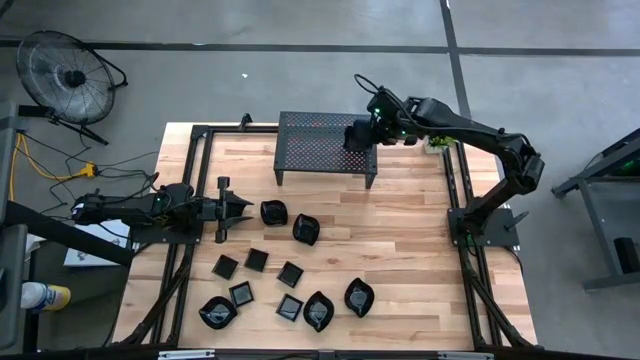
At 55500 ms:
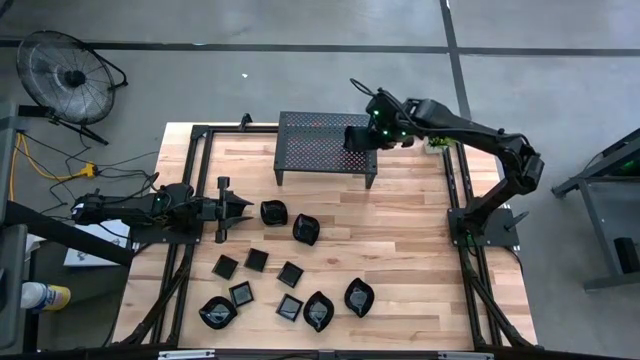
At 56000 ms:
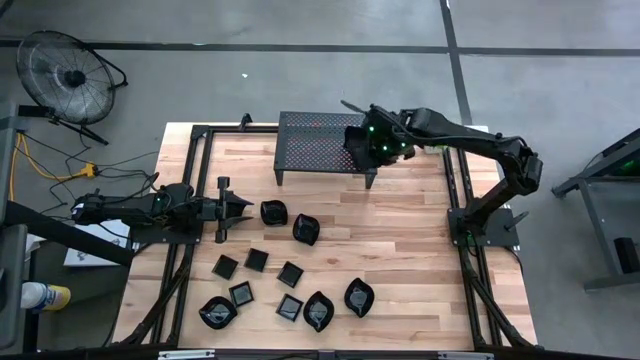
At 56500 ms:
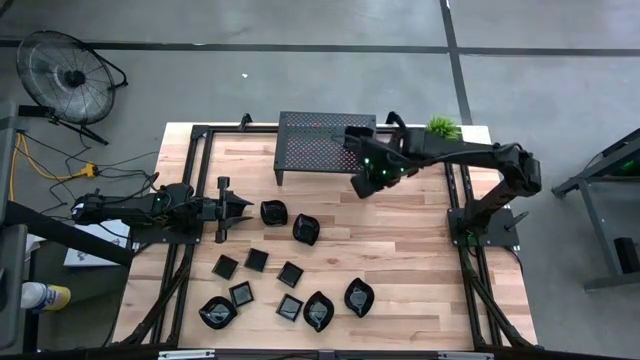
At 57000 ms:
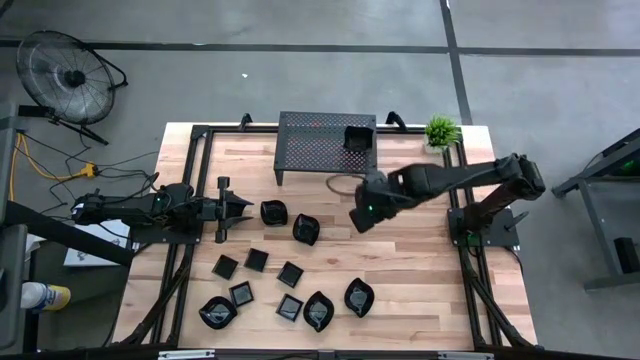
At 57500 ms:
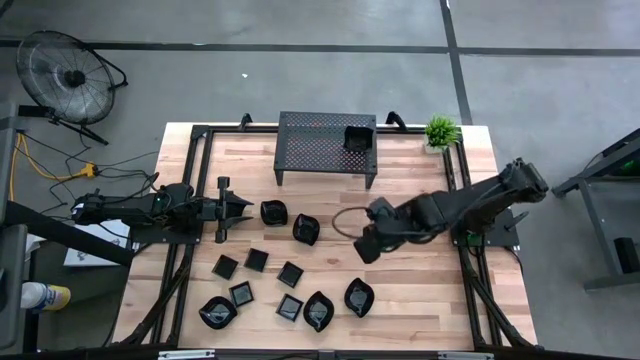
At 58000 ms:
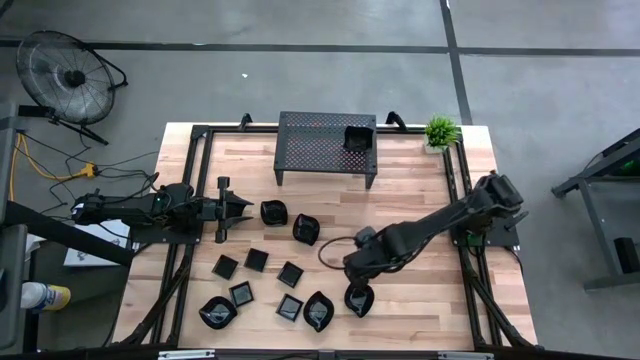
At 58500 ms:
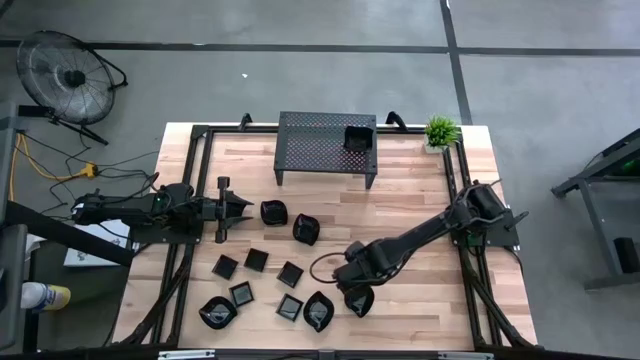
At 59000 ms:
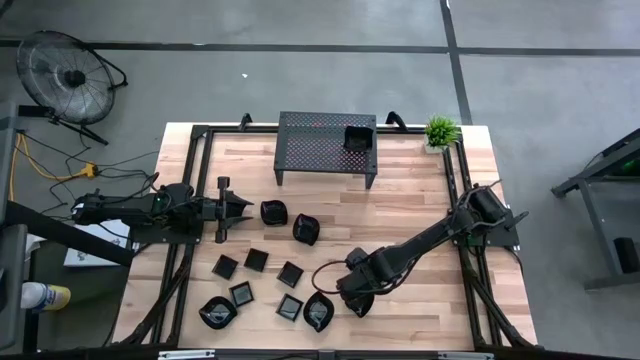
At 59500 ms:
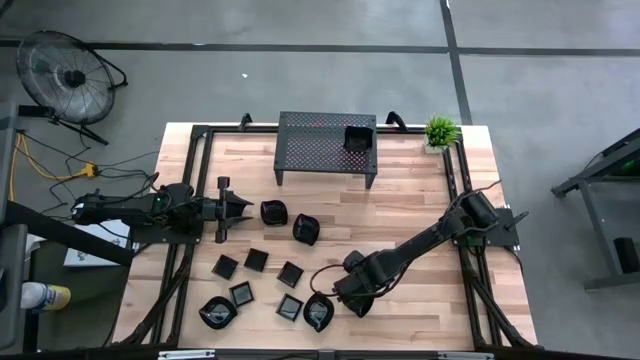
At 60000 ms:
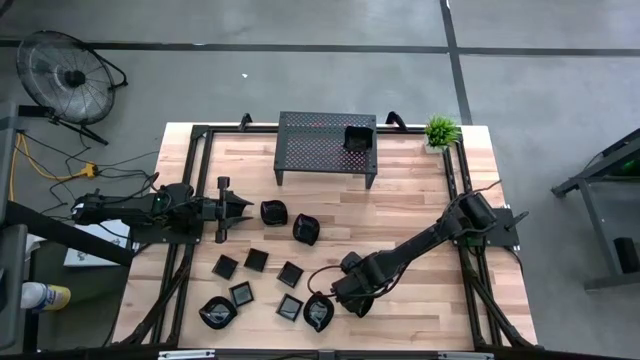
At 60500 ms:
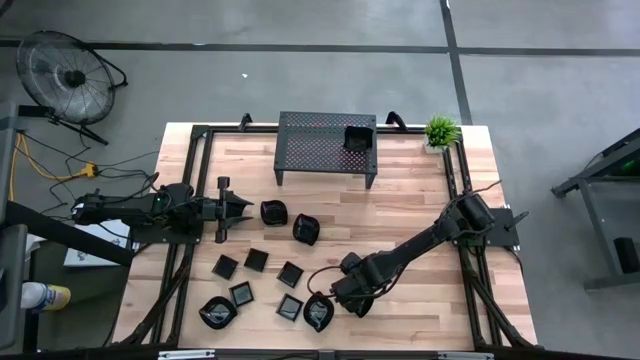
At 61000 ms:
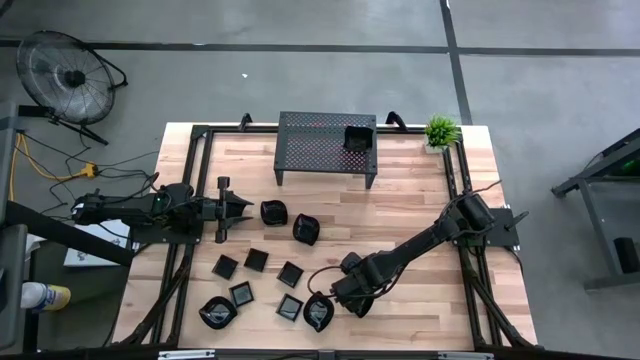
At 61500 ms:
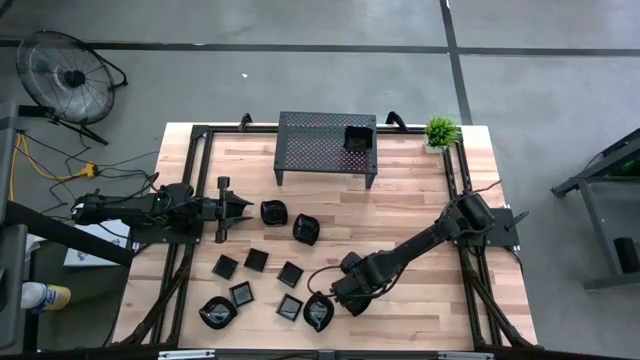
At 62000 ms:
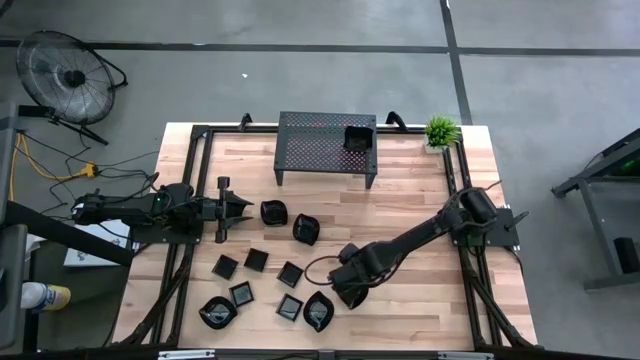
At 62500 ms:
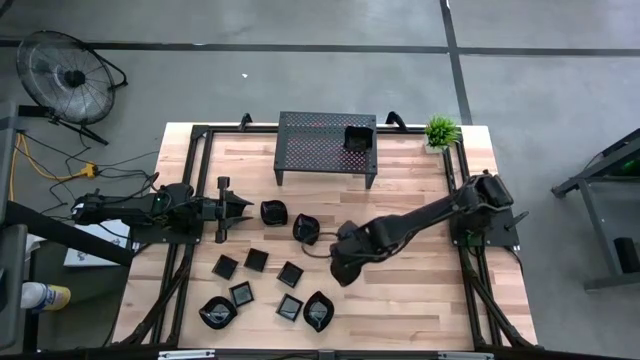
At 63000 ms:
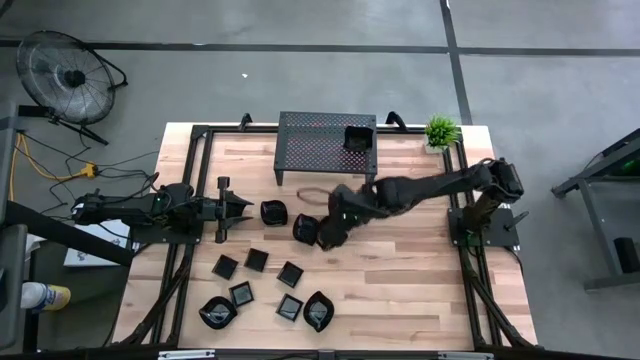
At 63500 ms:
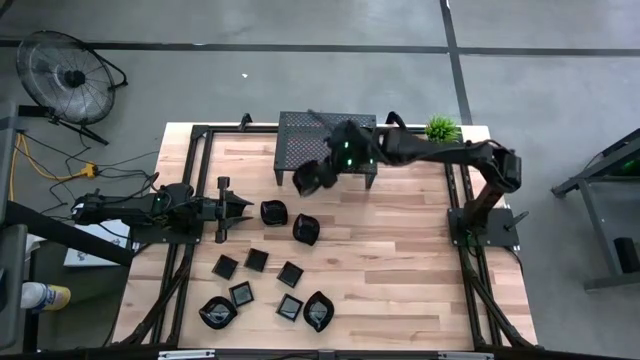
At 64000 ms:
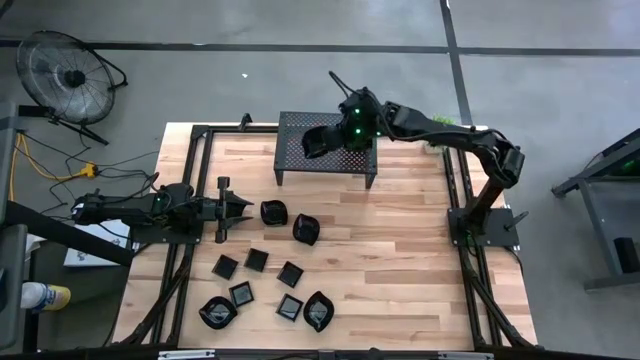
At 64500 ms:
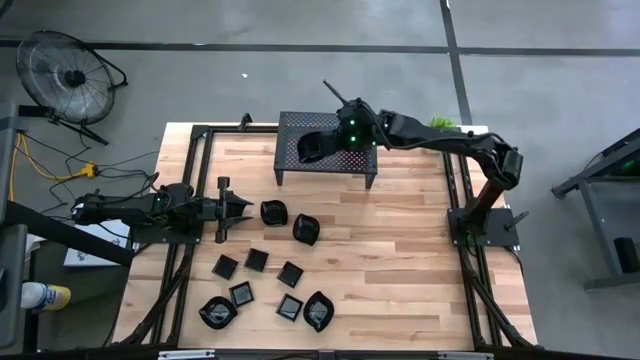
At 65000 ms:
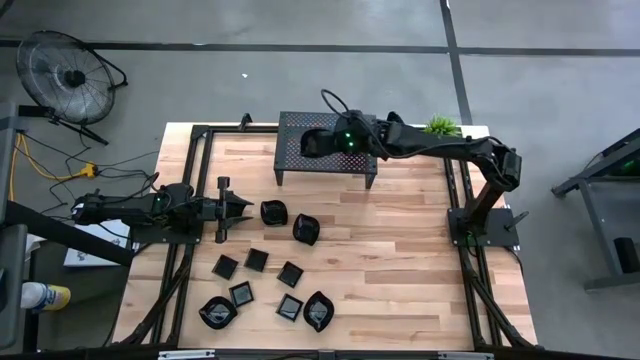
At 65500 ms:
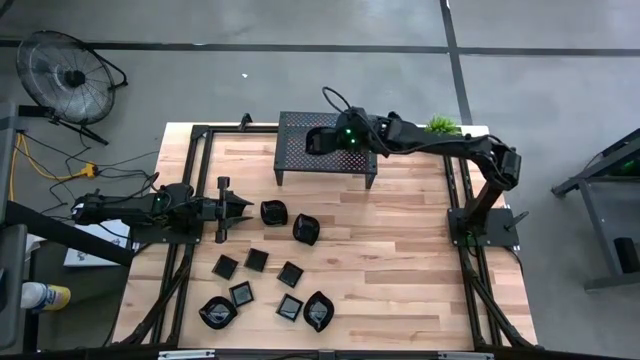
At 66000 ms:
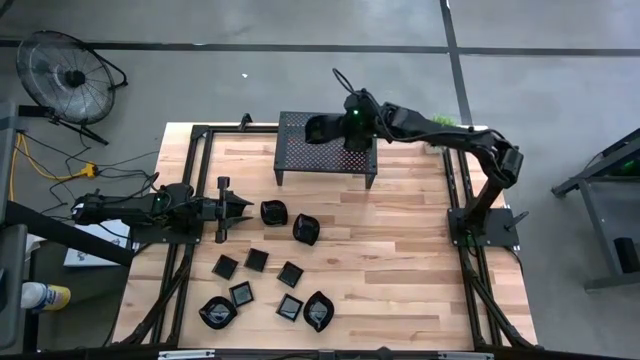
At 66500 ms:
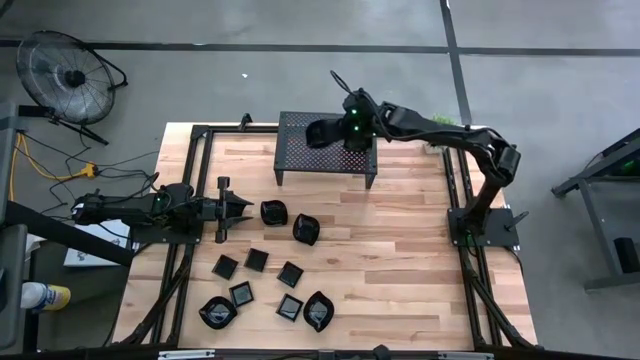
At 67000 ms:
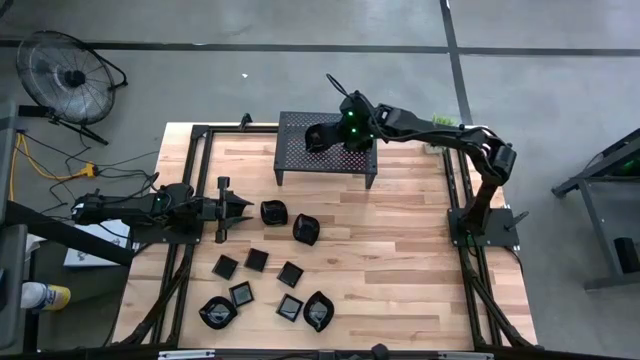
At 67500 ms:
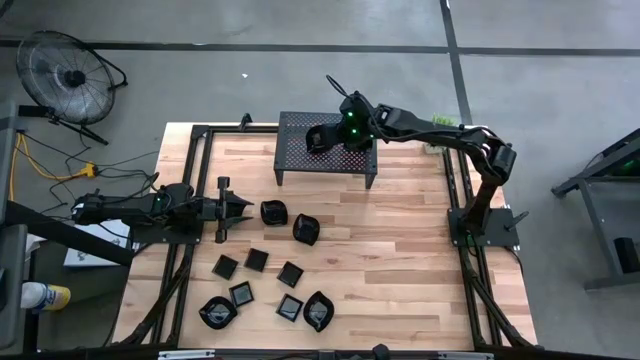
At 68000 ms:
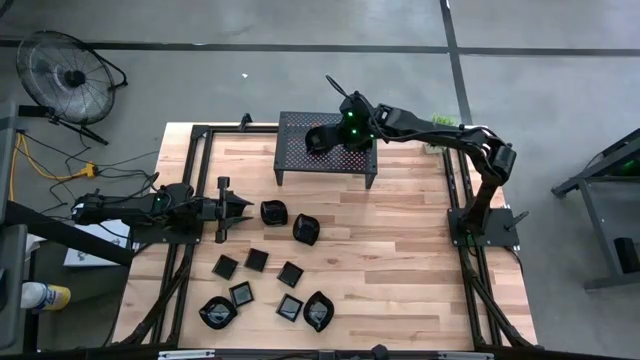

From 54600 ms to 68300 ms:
Task: Pick & Place Mini shaped plates
Put the black leaf shaped plate on the shelf

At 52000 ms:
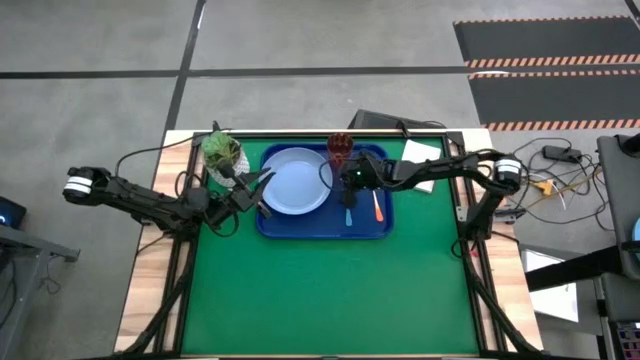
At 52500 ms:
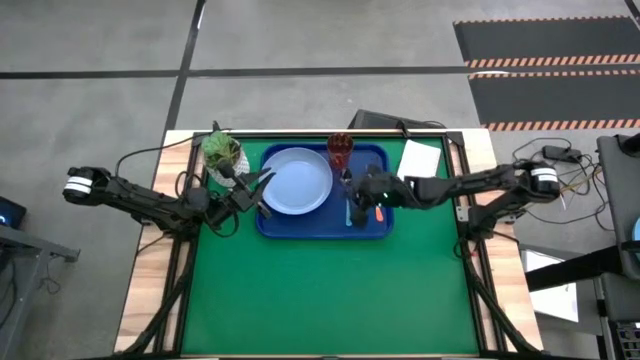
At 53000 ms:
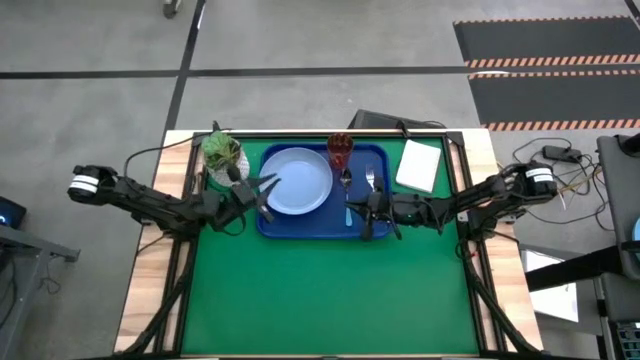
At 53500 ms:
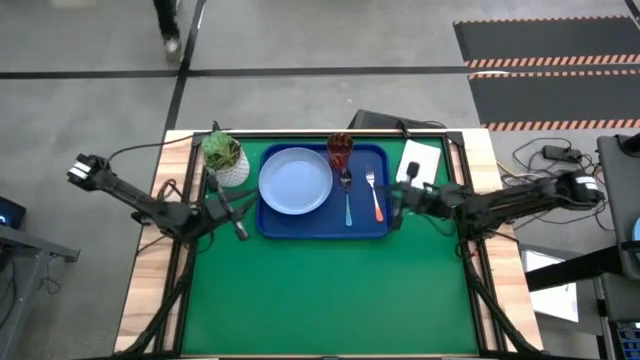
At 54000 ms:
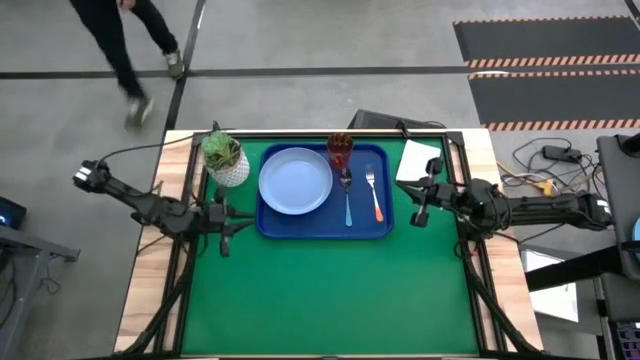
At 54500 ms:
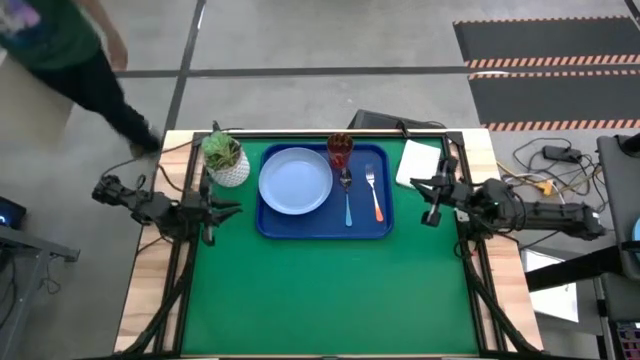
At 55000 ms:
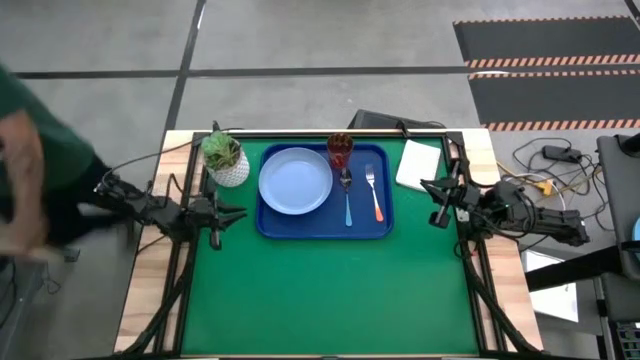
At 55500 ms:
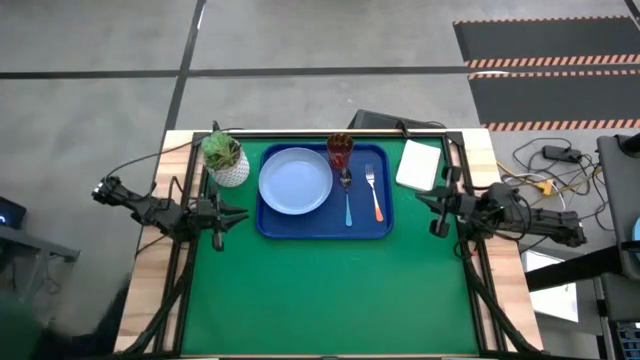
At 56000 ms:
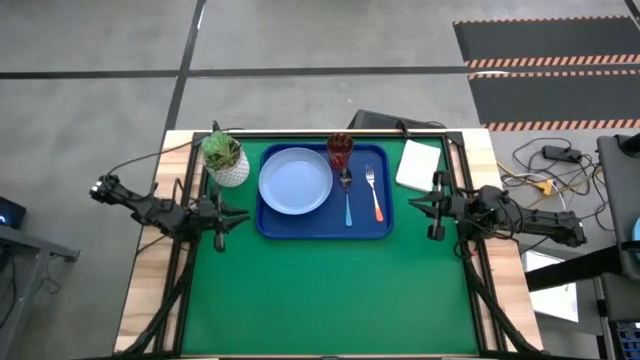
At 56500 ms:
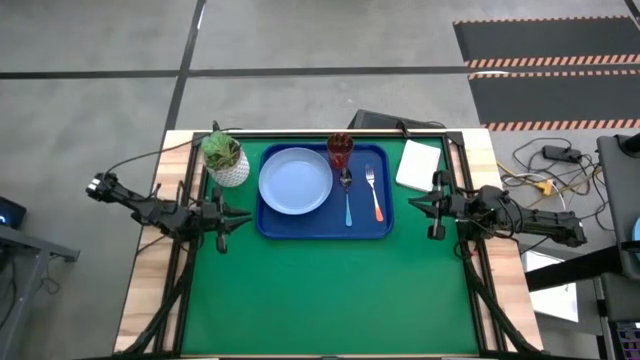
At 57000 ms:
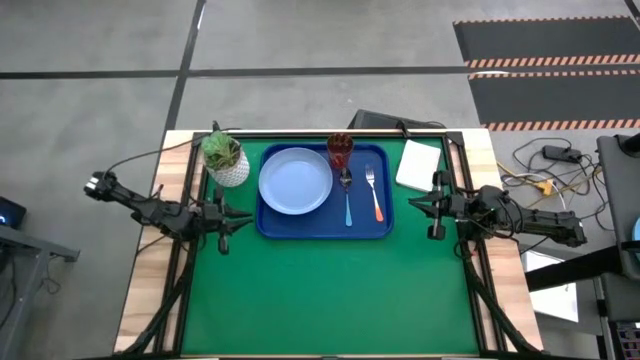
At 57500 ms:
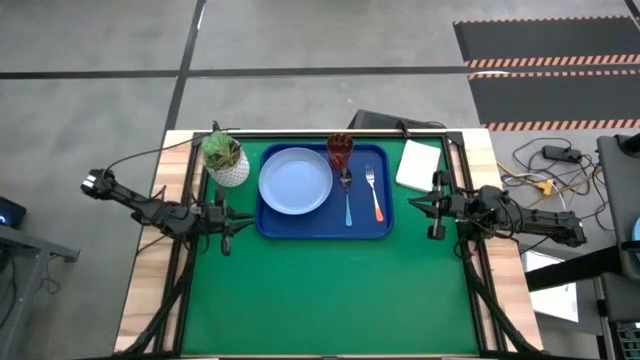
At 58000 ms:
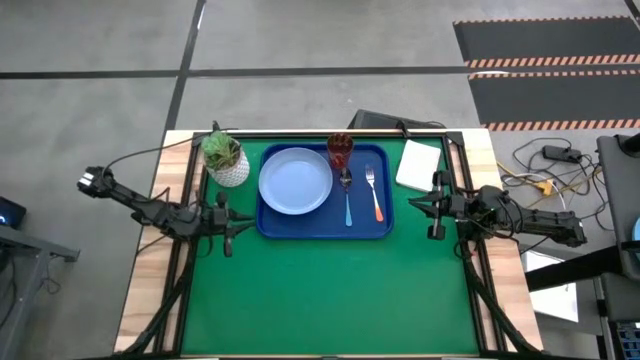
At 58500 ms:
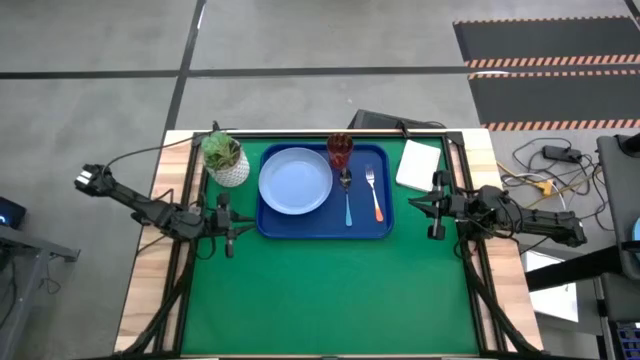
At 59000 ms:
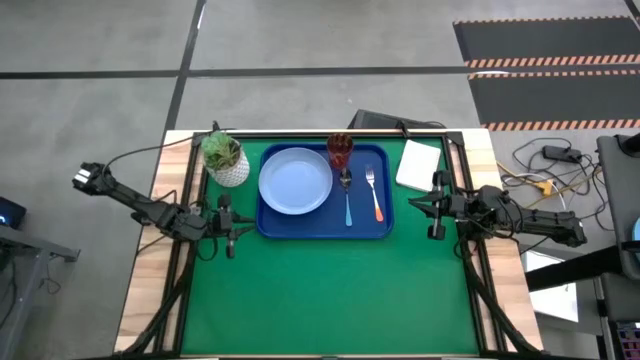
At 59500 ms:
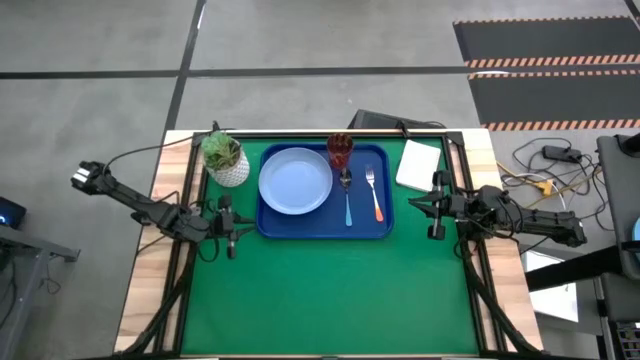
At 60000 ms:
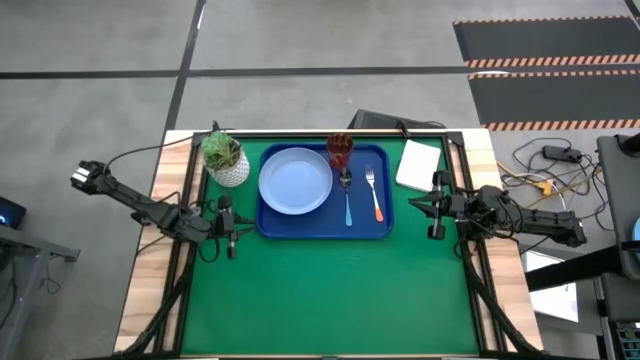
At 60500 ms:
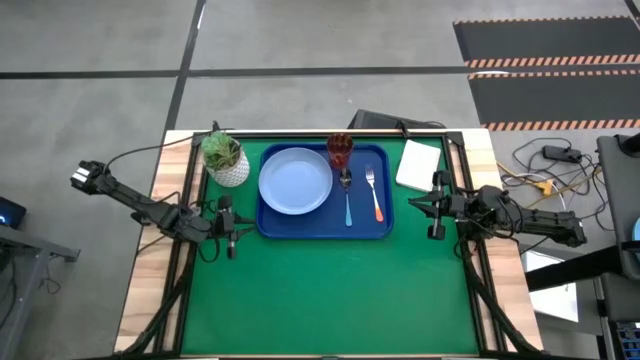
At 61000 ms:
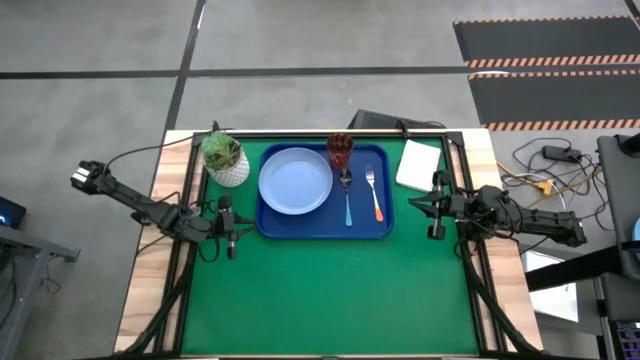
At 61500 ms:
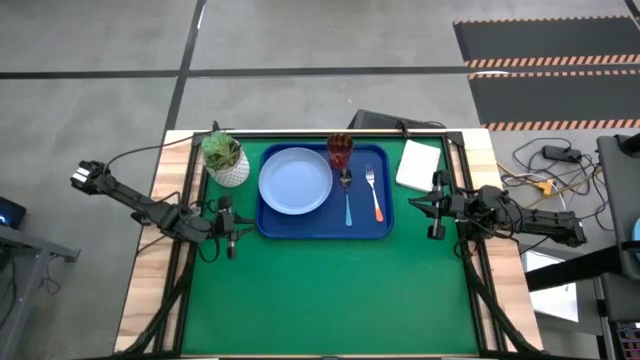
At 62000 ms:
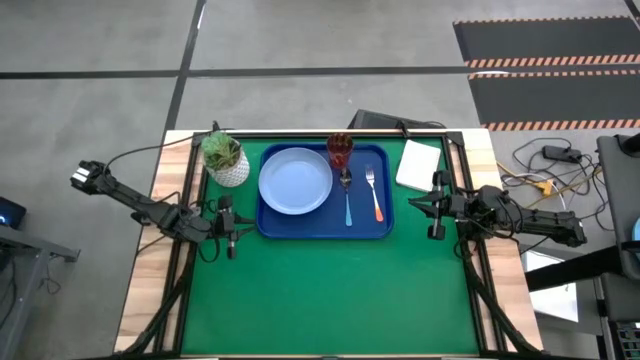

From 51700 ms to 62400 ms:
Task: Pick and place plate/cup/fork/spoon on tray
Return to Home Position
